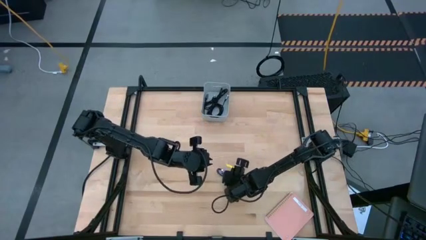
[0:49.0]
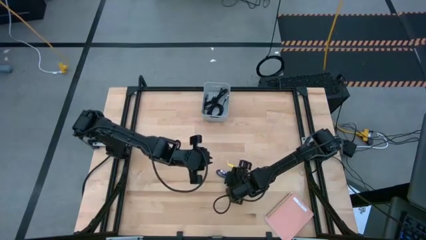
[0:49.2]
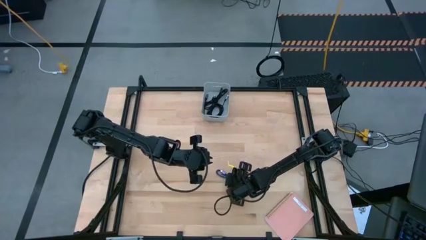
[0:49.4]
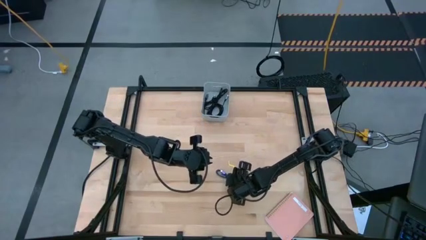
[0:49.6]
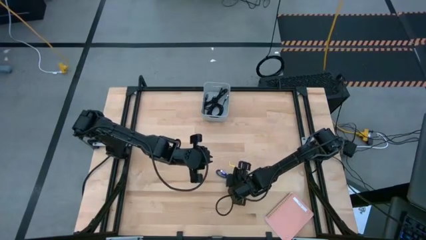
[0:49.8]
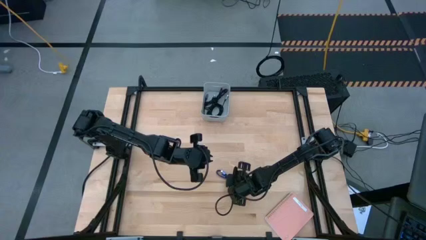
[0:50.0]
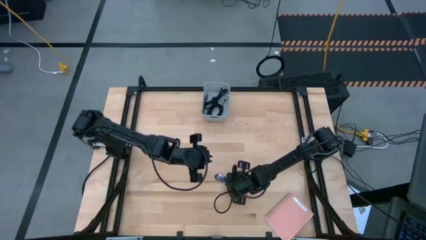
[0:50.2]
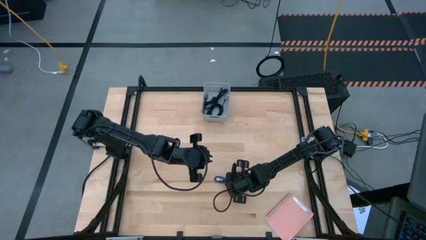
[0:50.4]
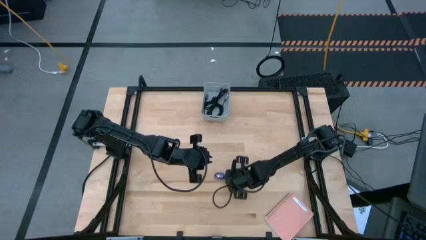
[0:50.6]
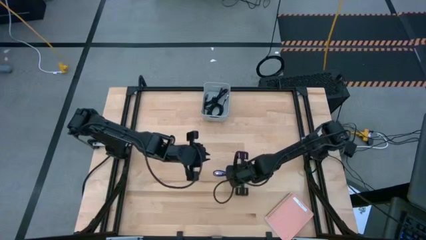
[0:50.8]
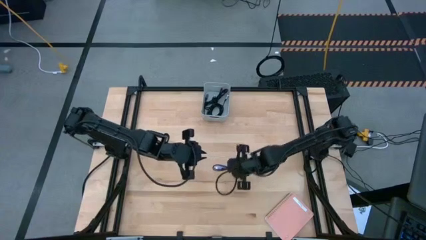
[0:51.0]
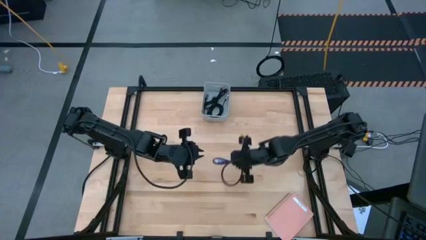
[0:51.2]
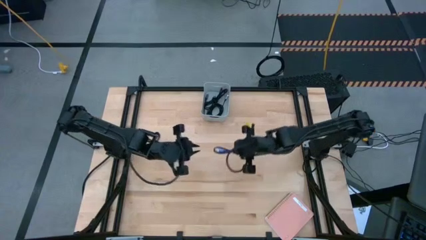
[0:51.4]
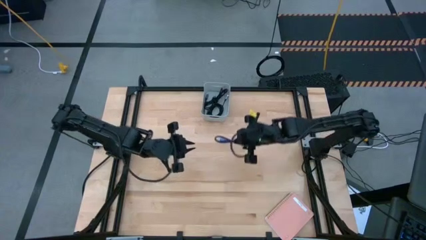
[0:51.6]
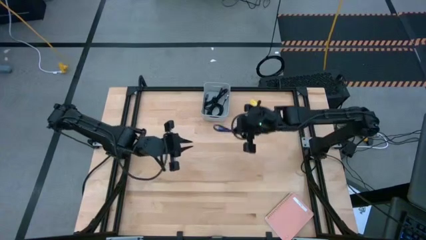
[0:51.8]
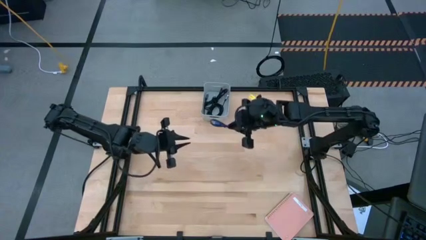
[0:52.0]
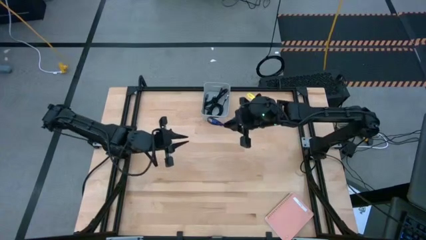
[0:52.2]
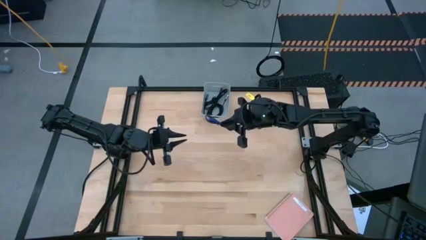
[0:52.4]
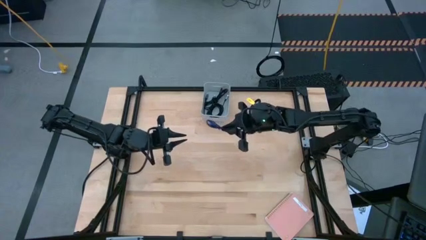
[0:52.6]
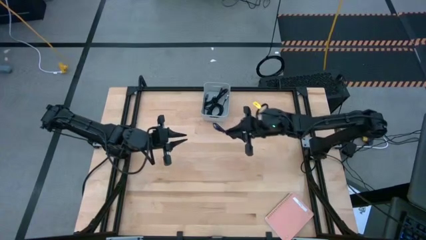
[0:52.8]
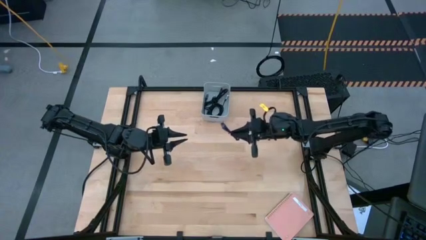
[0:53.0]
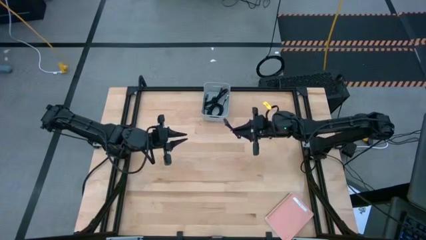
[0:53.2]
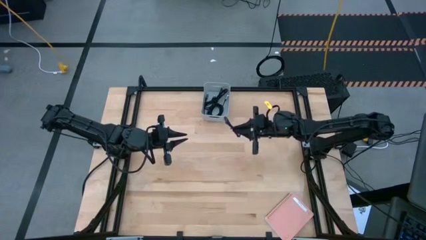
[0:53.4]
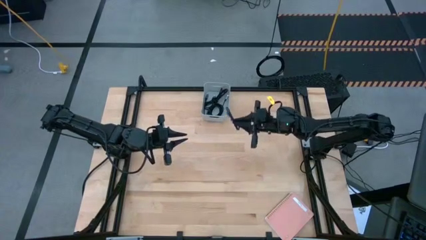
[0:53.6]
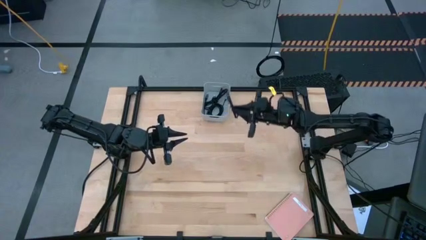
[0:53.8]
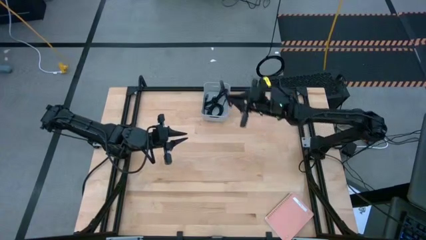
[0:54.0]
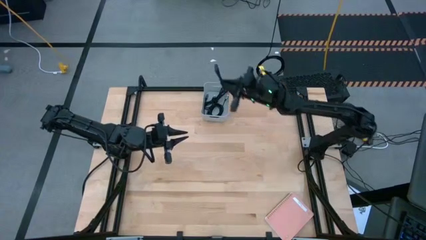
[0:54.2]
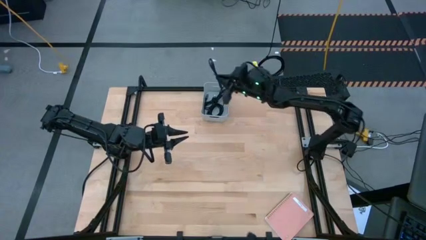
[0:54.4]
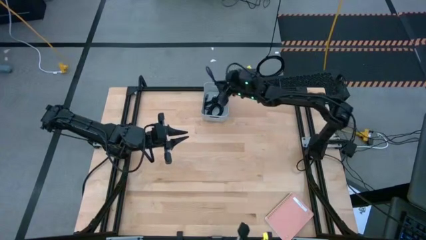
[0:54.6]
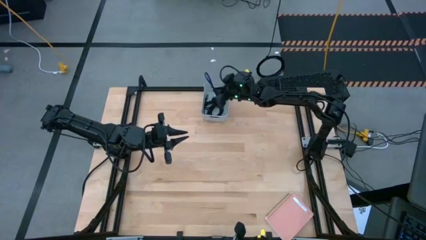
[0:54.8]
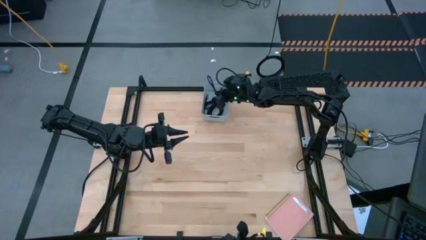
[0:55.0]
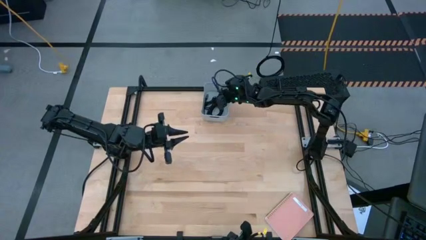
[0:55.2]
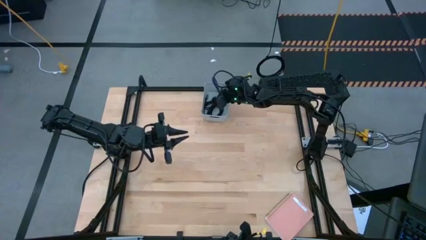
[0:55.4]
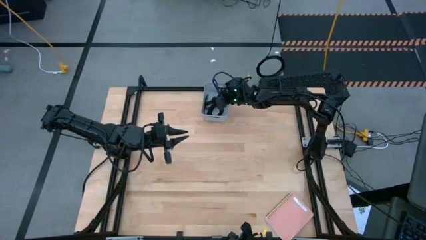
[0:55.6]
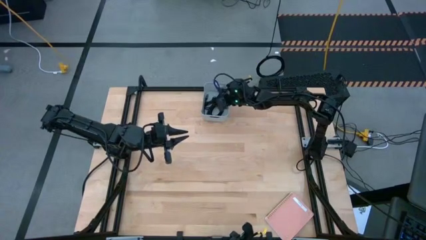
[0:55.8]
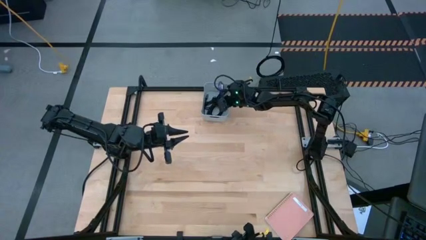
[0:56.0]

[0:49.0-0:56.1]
Task: Pick and place USB-C Cables
Put the blue charger cable into the gray bin

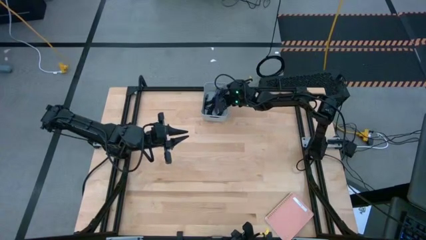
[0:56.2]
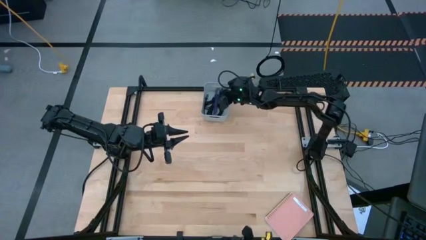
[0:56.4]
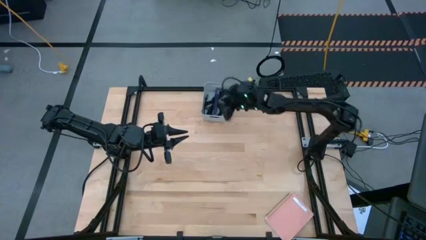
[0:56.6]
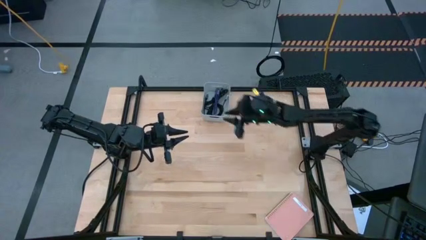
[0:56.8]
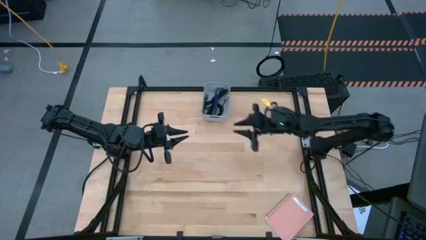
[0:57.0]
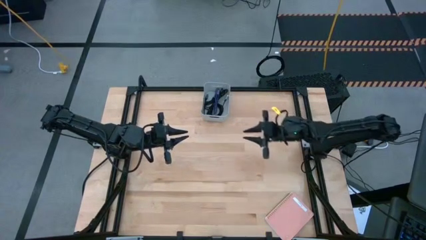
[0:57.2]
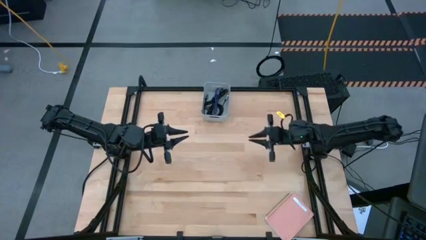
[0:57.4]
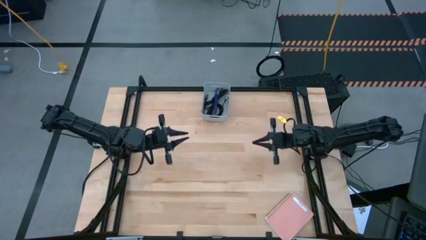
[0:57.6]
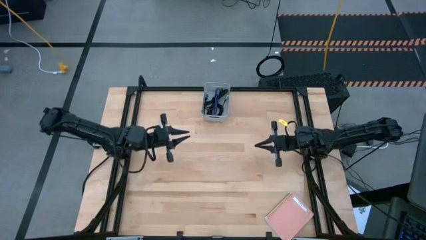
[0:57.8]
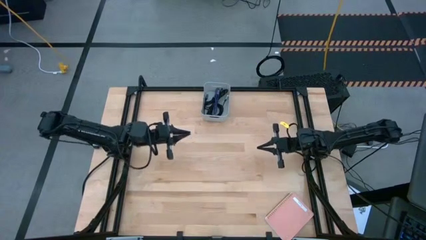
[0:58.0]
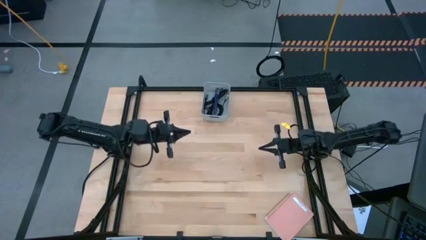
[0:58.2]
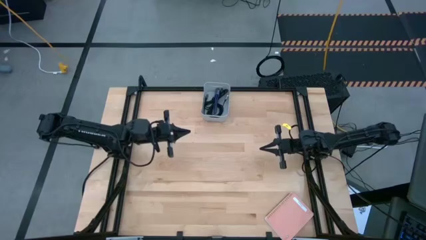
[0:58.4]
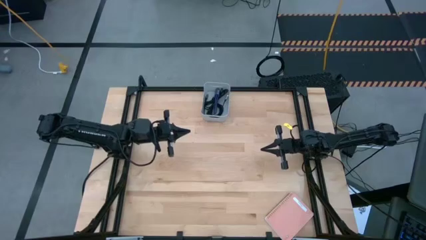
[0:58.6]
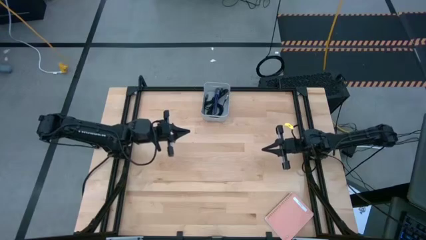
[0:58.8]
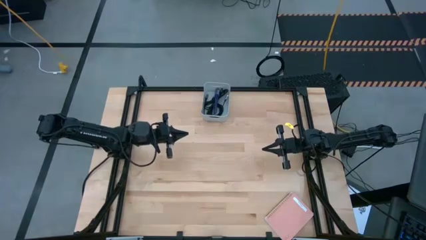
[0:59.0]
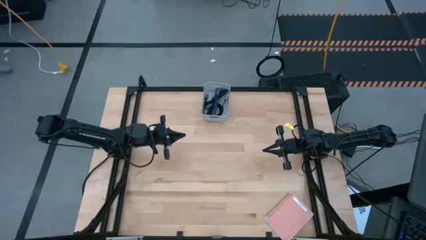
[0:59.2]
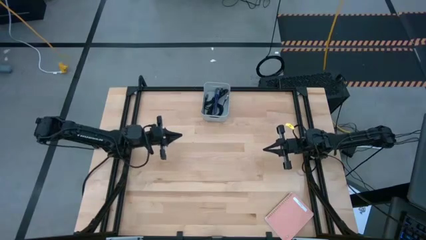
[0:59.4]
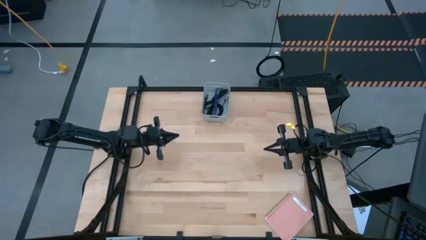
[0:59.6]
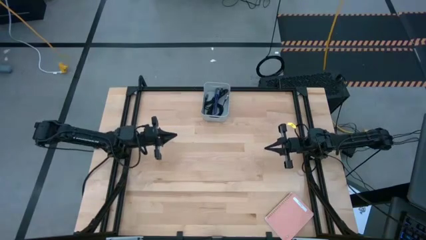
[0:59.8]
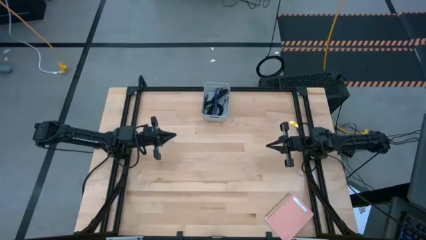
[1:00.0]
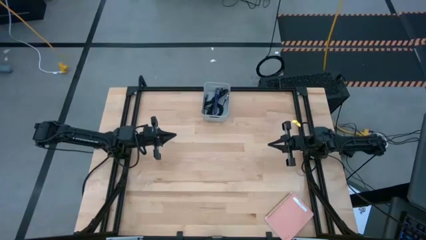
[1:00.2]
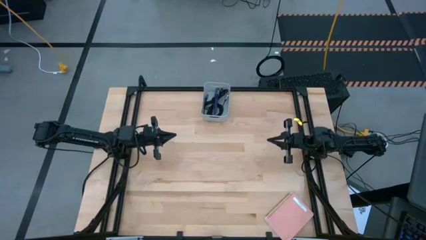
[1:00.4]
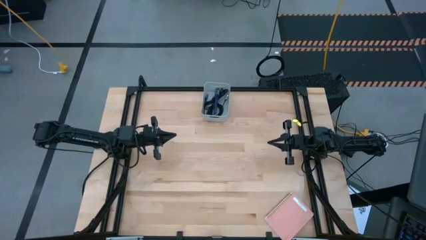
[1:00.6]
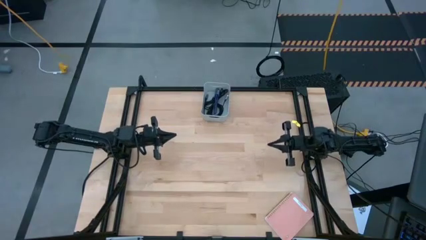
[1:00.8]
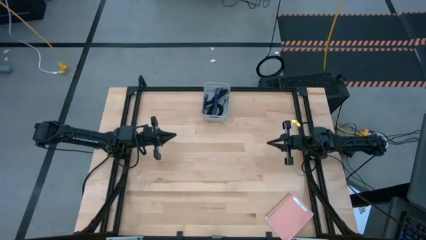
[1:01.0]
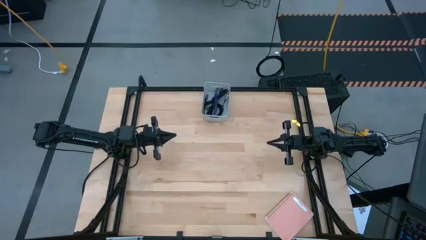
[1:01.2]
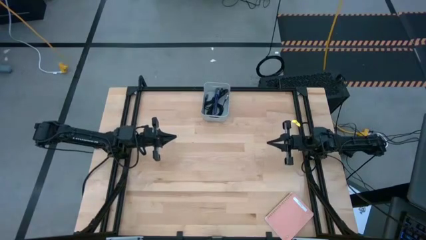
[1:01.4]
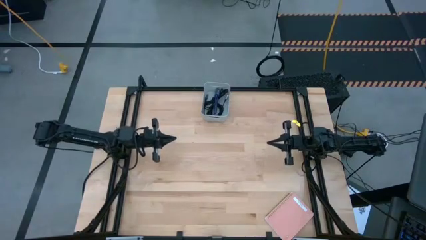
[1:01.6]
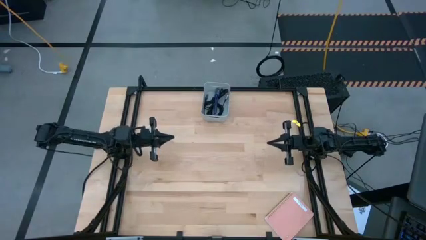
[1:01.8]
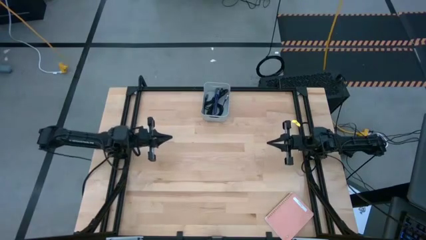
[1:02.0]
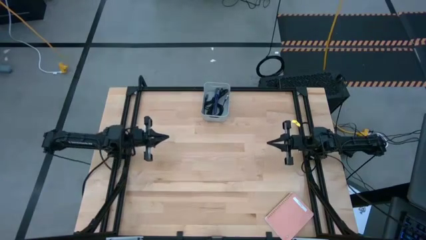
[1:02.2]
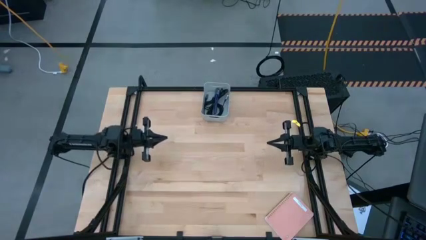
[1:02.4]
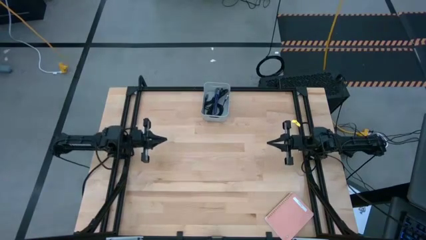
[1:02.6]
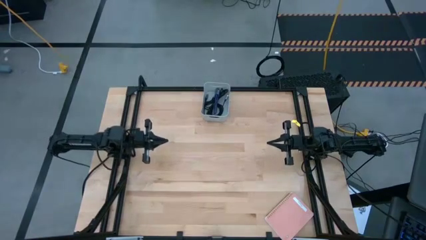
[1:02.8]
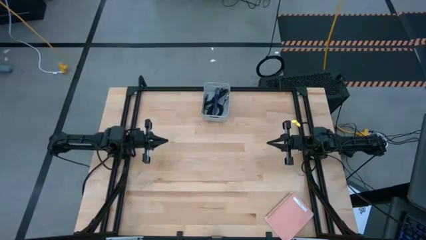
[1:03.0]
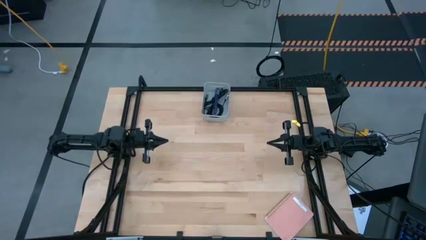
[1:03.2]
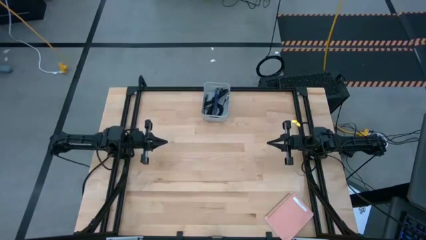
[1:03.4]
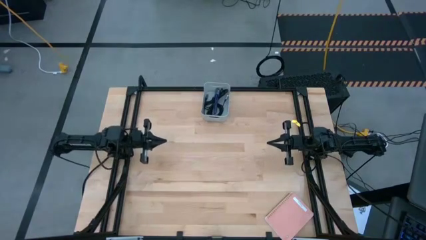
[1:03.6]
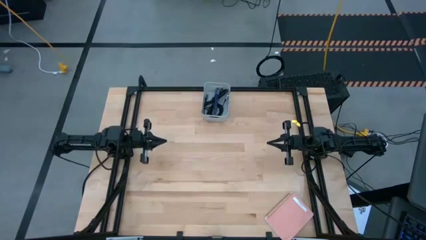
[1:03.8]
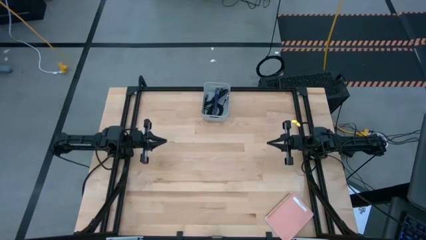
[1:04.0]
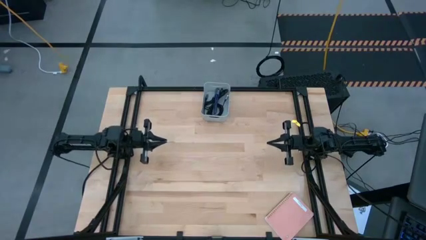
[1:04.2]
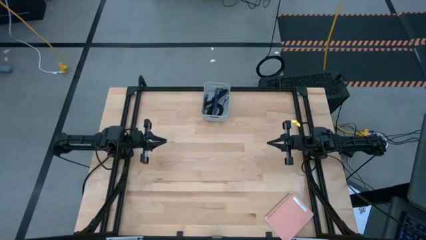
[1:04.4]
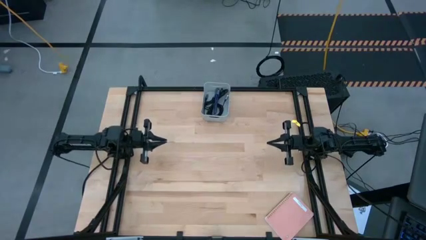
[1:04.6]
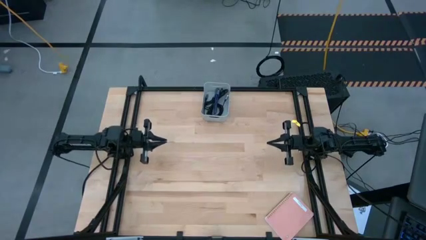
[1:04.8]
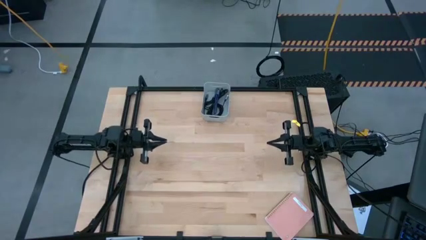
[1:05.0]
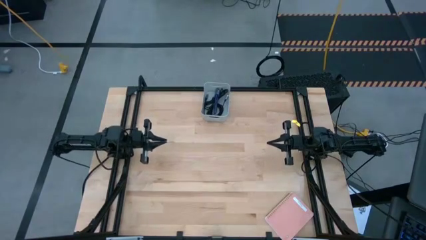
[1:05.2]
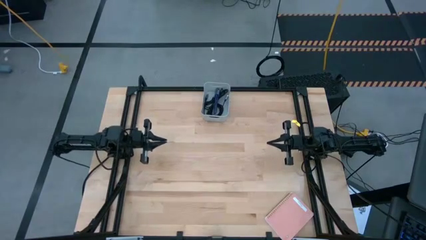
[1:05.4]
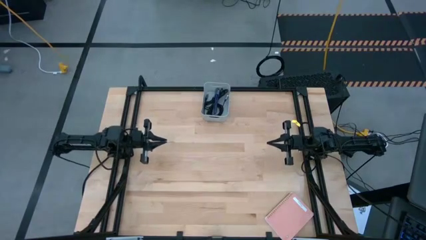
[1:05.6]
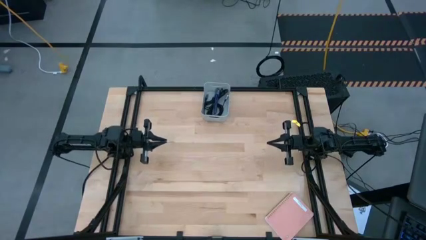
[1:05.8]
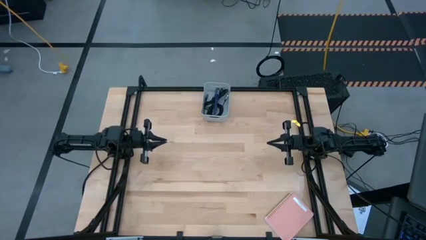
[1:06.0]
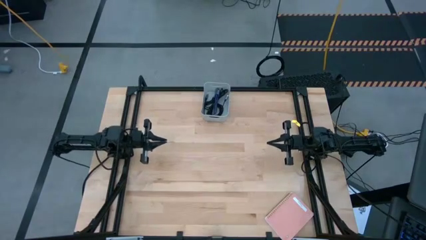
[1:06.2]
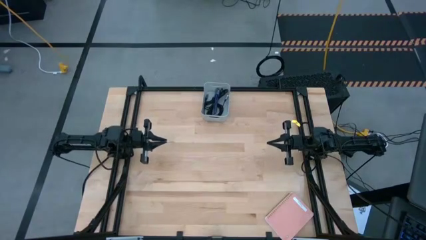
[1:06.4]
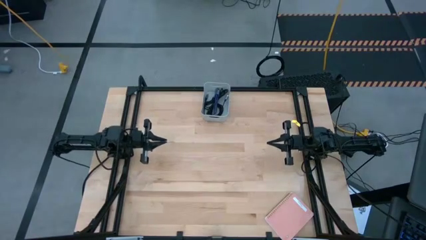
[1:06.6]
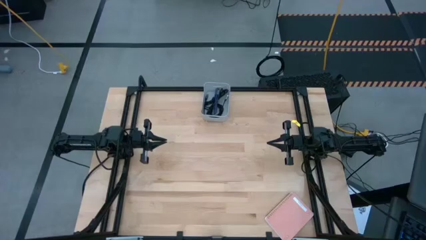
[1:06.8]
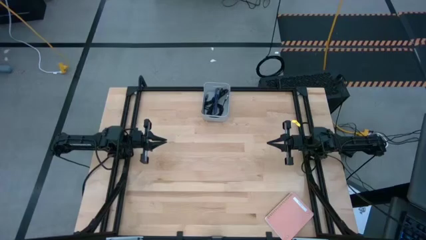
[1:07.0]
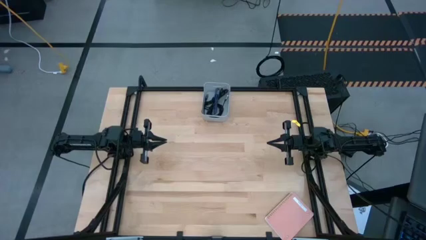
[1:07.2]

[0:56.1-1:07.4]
Return to Home Position
